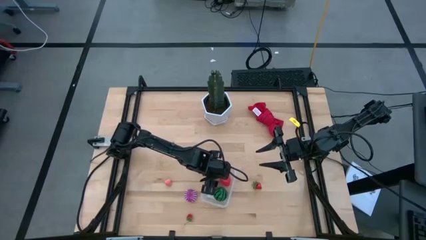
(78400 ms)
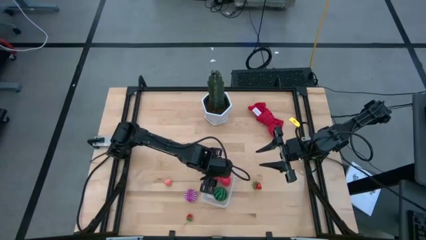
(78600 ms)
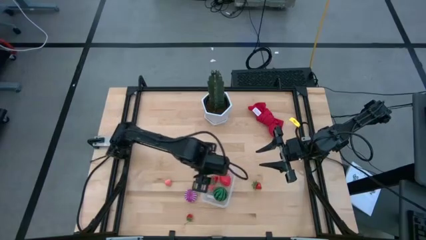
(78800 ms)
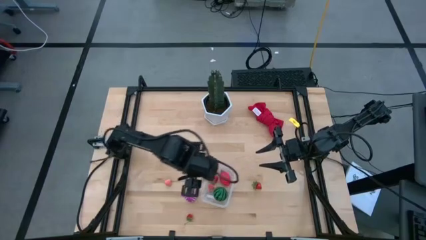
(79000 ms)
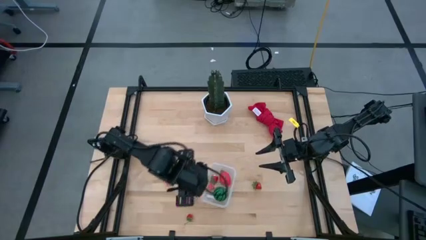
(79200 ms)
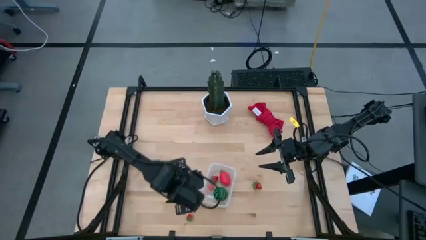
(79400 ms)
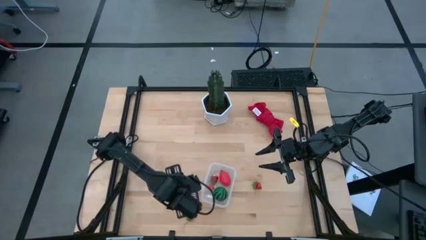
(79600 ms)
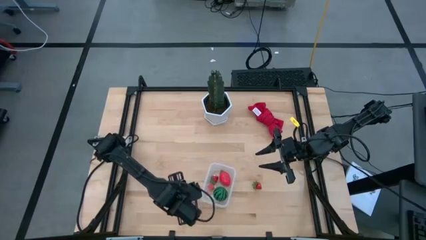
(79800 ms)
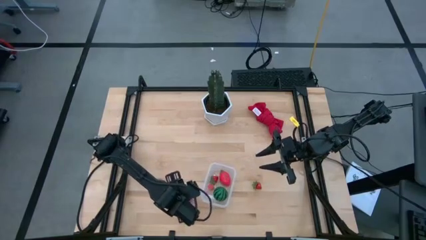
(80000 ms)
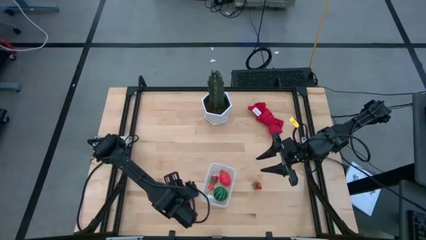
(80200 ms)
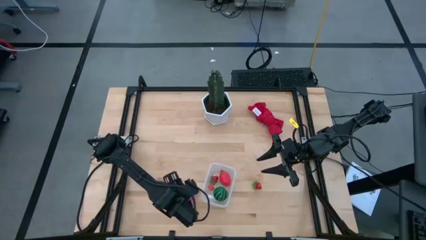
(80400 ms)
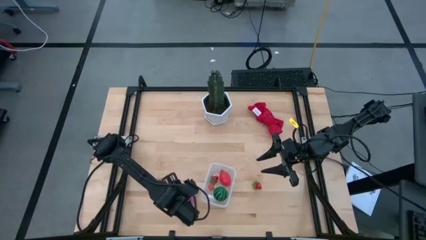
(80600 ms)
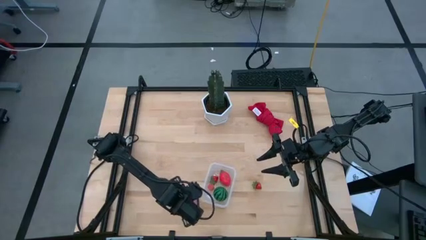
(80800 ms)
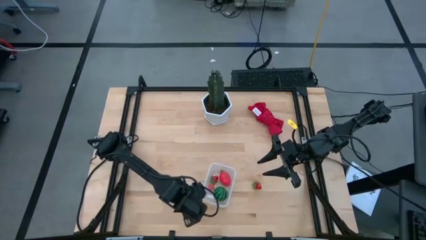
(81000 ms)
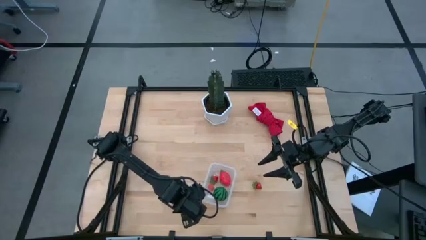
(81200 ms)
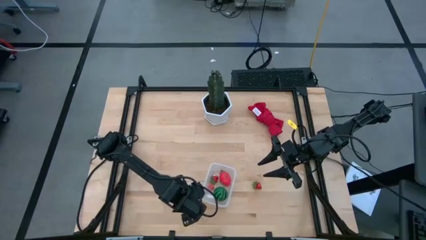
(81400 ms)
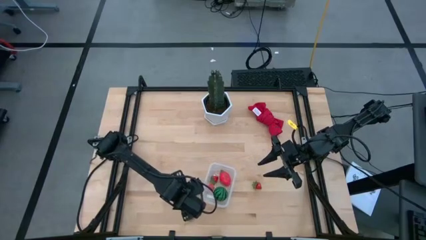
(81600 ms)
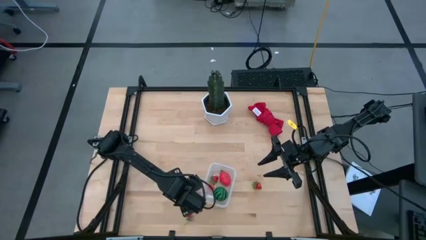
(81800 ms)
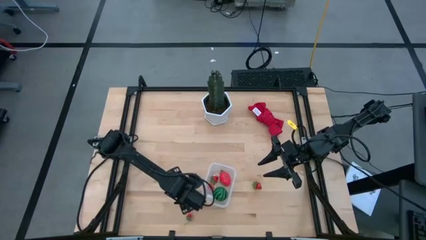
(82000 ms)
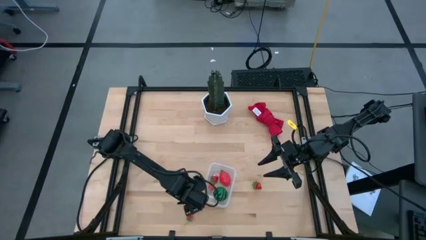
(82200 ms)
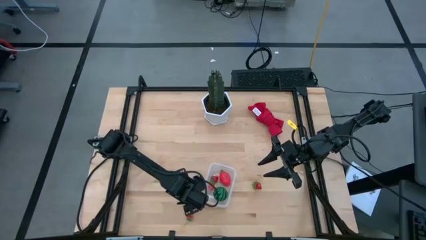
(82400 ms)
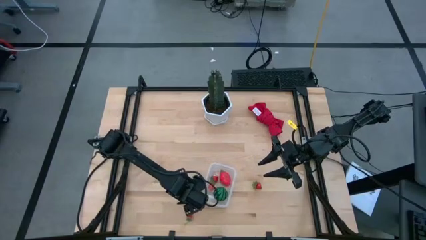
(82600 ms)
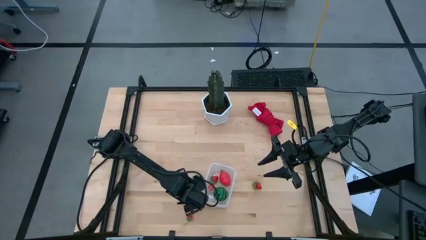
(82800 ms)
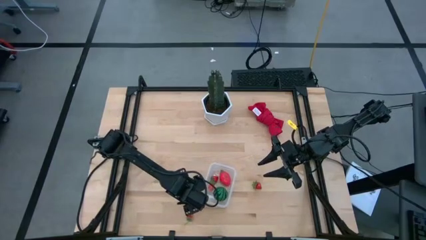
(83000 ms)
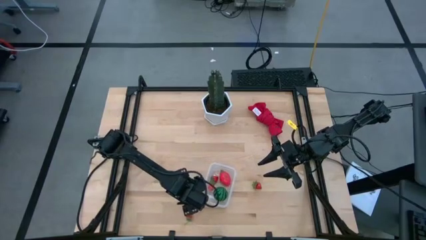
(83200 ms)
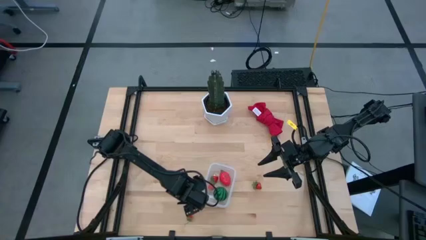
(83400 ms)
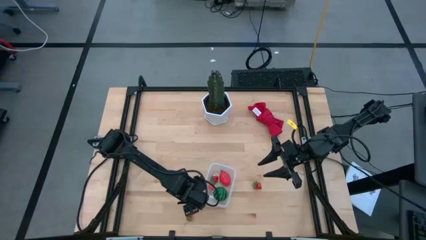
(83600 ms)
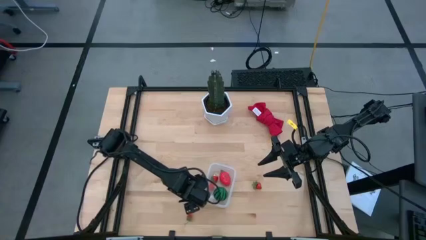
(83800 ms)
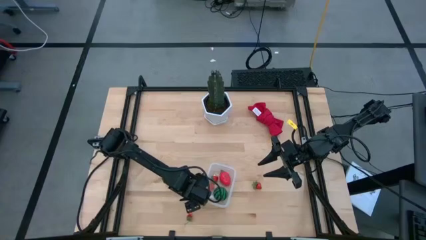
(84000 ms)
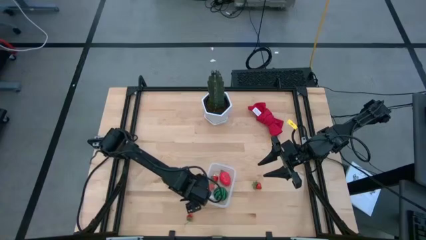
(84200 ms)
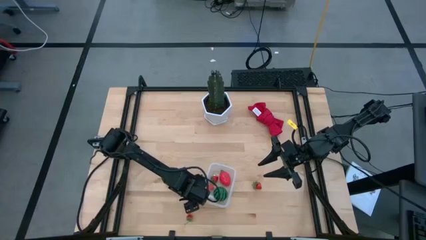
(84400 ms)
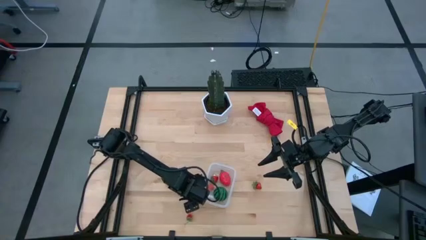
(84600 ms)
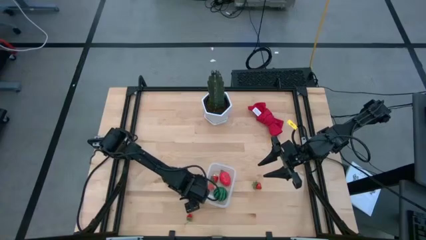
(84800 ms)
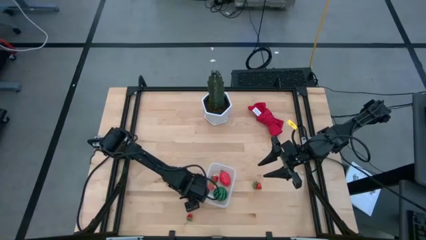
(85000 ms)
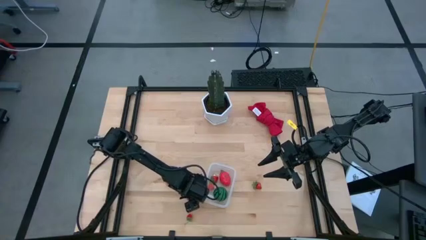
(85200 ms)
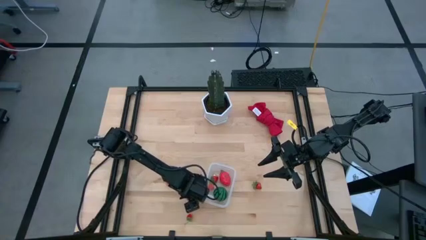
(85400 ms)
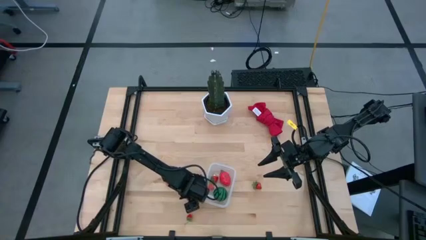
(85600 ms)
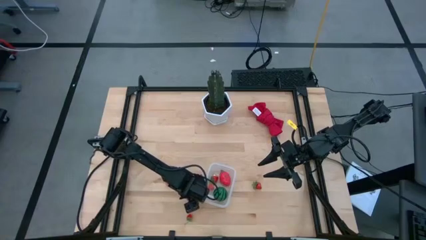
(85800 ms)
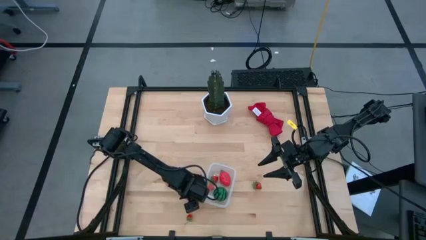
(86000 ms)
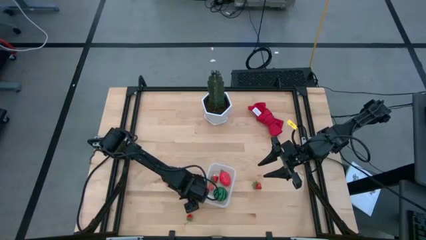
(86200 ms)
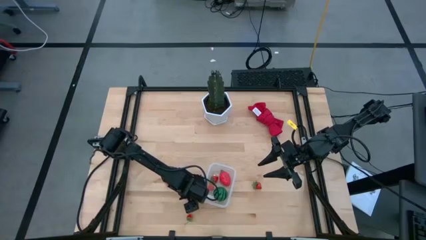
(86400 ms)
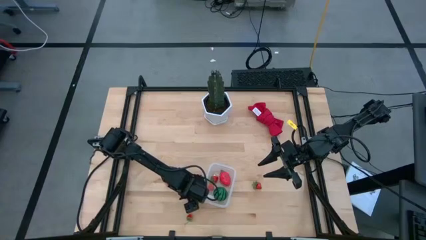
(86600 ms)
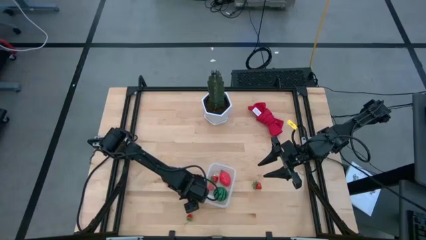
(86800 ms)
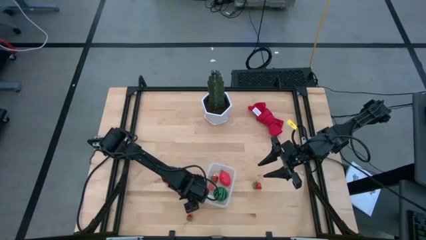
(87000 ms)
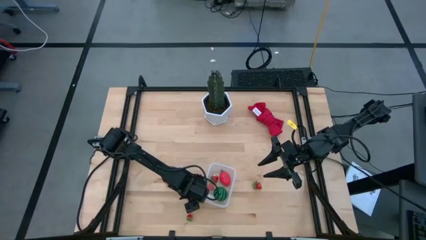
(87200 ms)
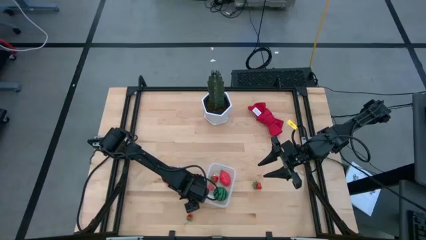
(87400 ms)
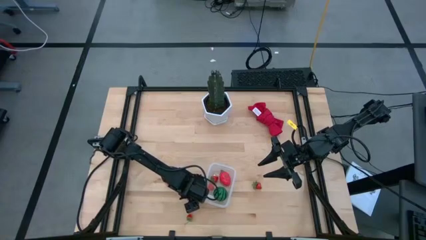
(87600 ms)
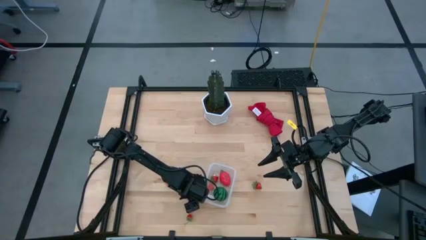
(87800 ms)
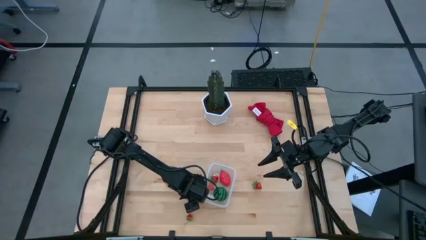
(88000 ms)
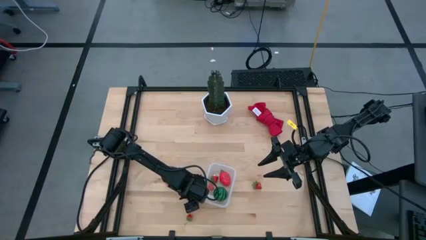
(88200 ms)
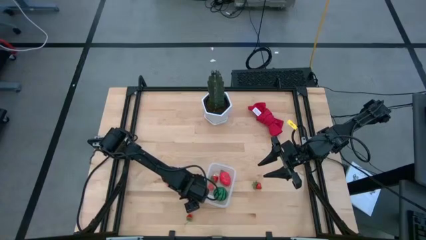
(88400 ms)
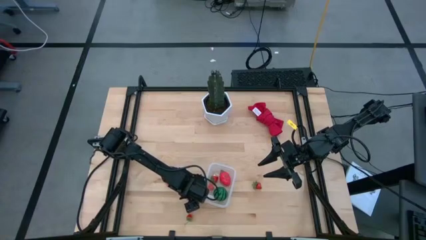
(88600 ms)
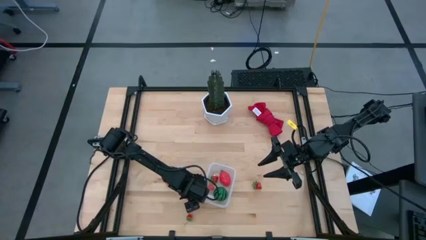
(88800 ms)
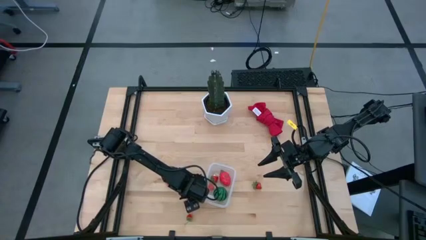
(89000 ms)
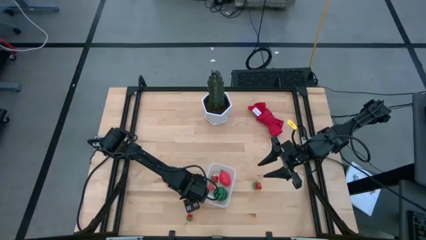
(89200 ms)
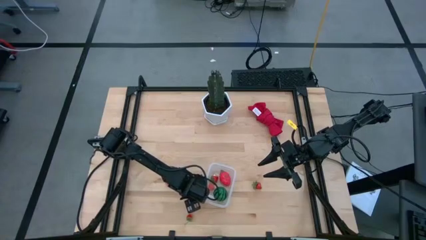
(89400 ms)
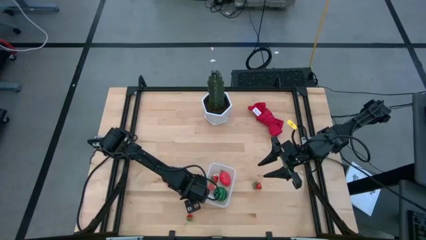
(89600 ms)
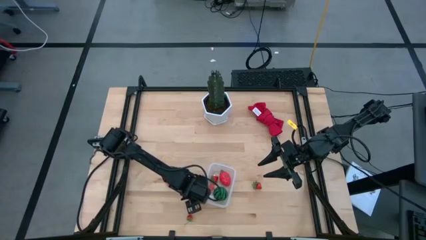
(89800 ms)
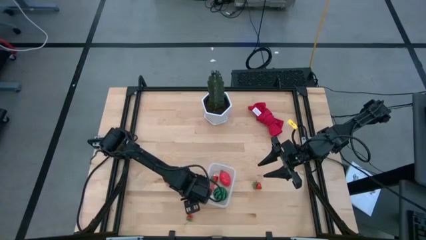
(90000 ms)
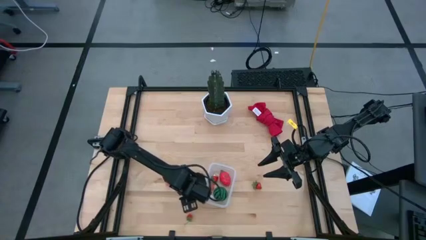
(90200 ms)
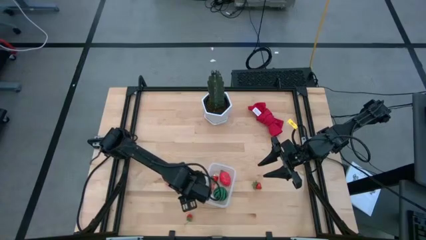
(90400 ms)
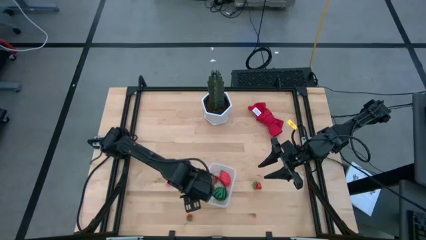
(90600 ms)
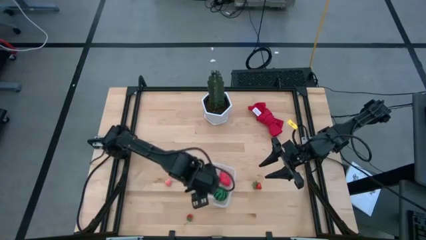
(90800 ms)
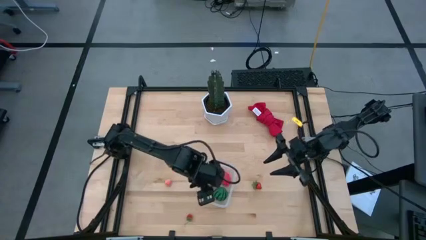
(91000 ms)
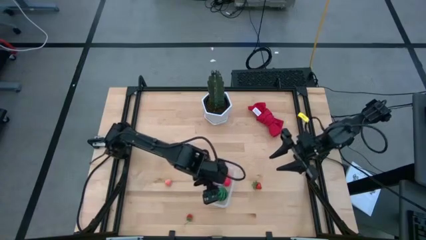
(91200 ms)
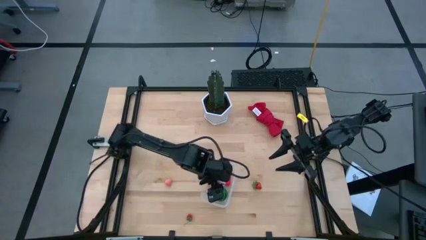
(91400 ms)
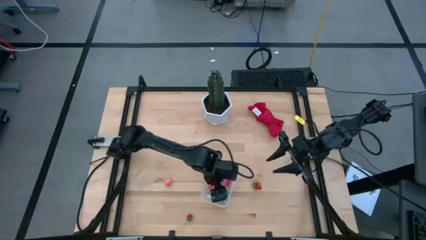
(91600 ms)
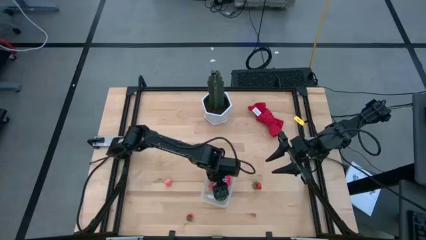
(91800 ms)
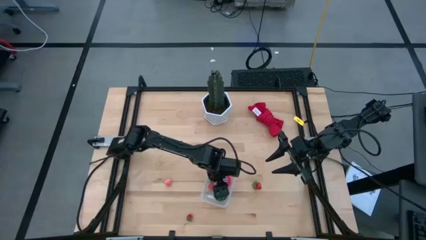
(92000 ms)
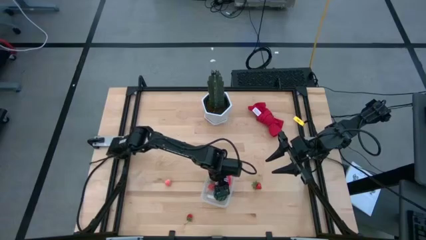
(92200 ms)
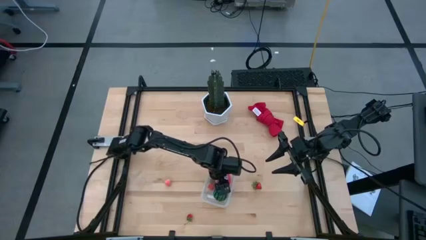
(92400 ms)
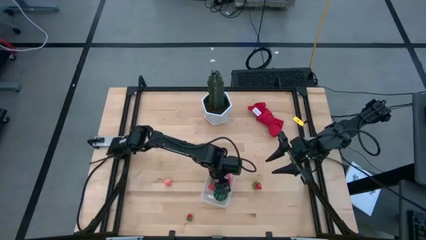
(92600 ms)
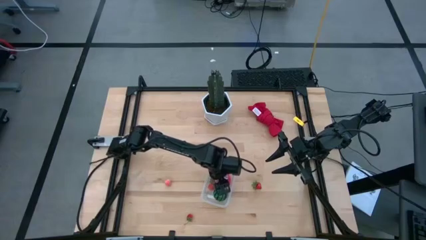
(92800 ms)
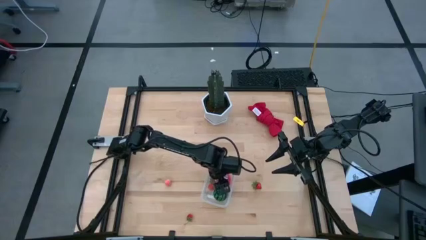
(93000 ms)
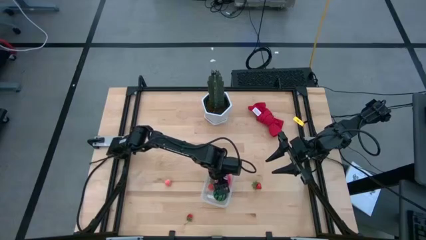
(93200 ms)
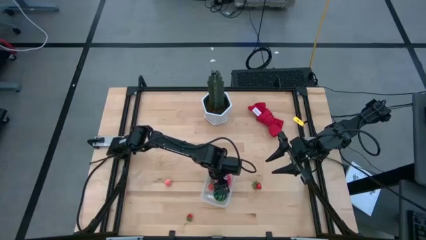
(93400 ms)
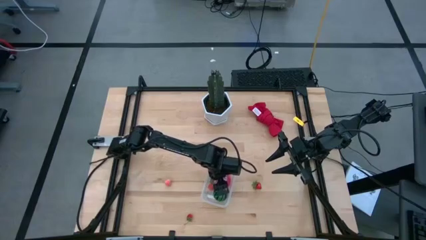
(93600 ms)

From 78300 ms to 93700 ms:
Task: Pick and placing Produce into tupperware
Put the violet onion into the transparent bin

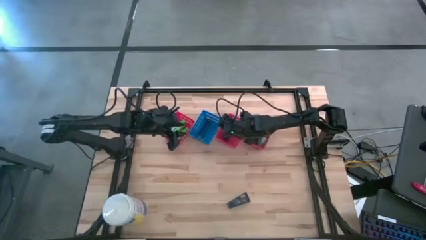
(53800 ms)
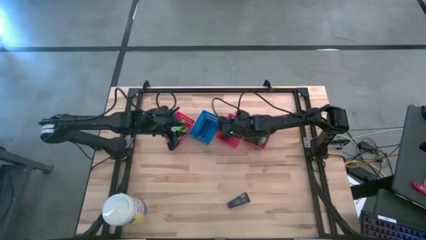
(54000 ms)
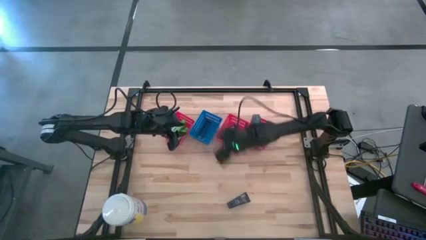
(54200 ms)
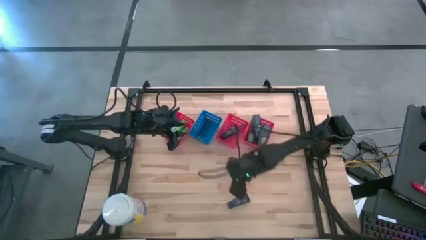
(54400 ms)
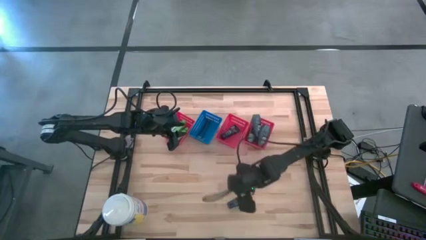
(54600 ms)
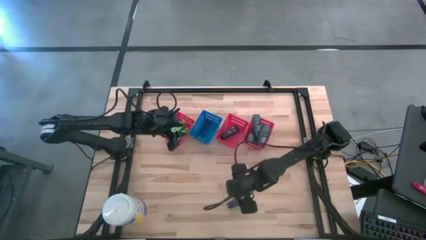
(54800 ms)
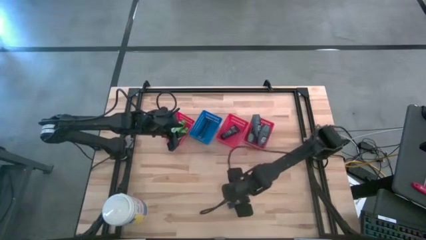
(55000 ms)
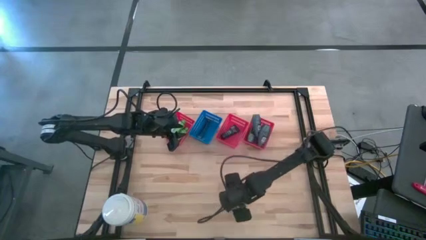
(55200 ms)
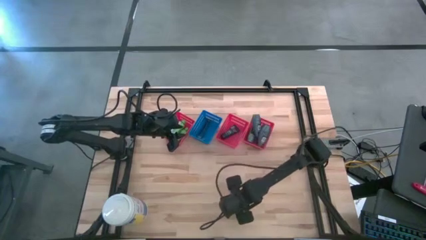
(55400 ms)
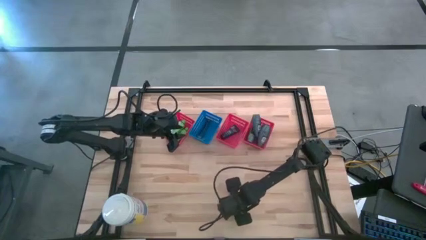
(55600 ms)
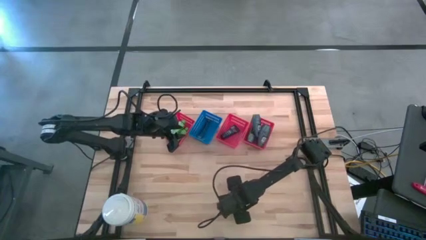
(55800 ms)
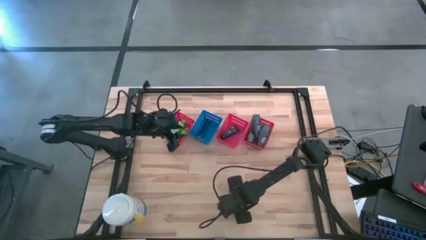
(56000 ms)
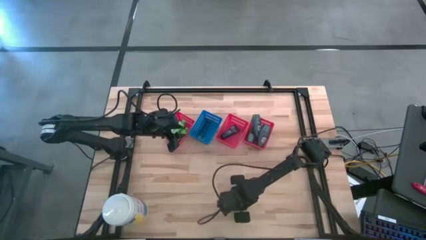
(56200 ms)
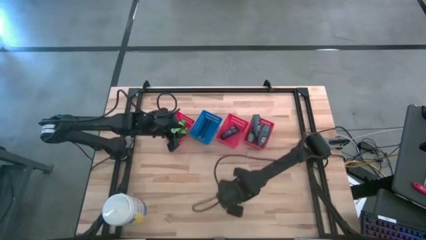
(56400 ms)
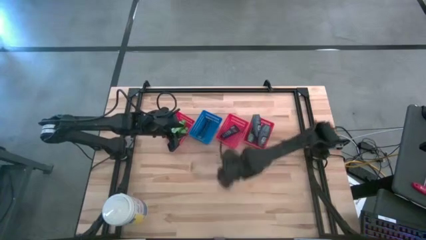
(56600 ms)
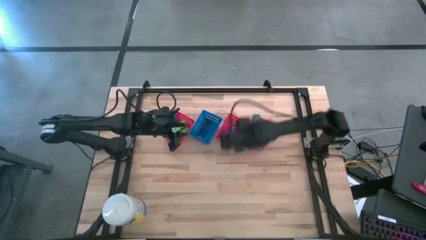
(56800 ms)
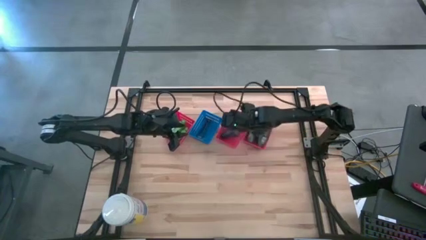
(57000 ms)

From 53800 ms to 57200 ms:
Task: Pick & Place Travel size toiletries
Put the blue shave cream into the middle red bin
